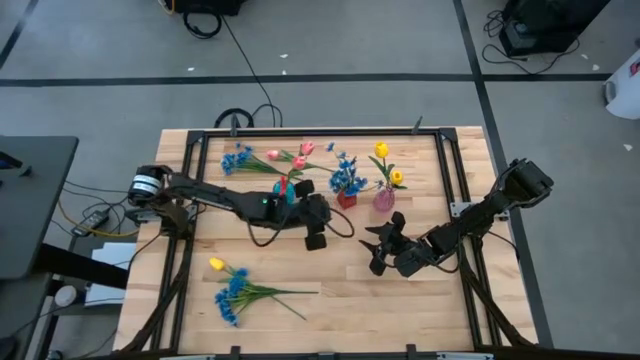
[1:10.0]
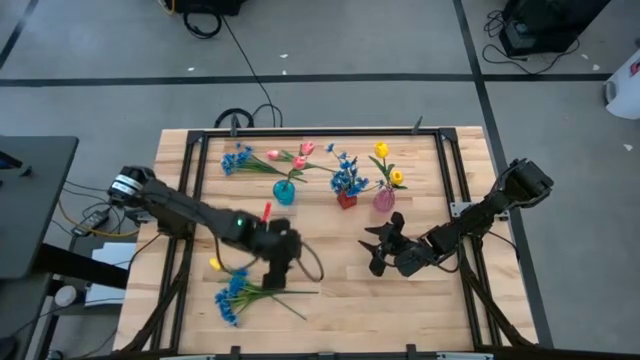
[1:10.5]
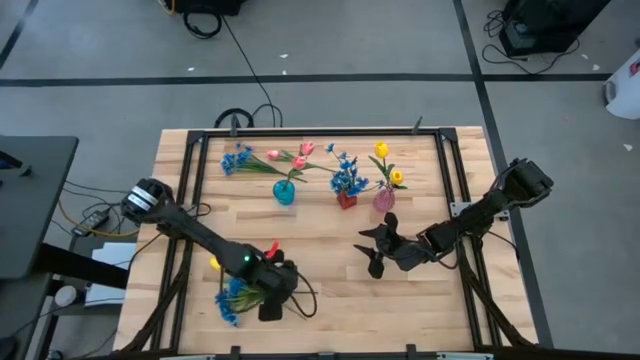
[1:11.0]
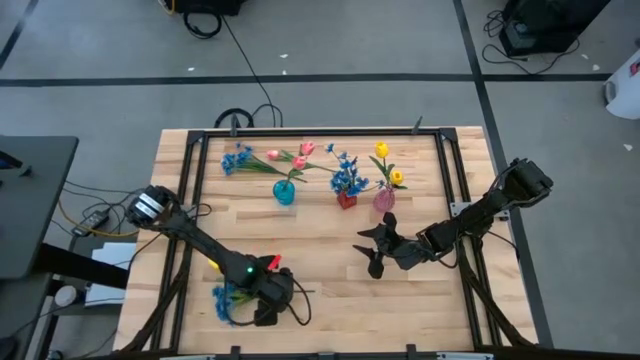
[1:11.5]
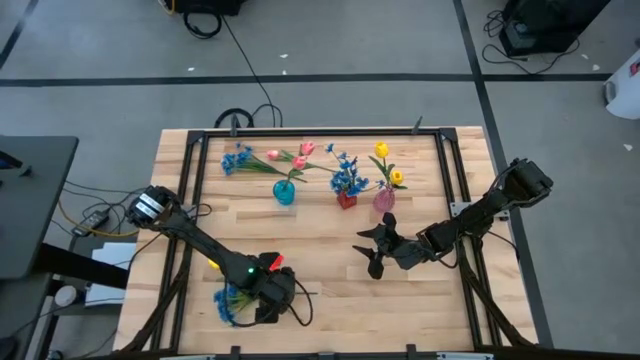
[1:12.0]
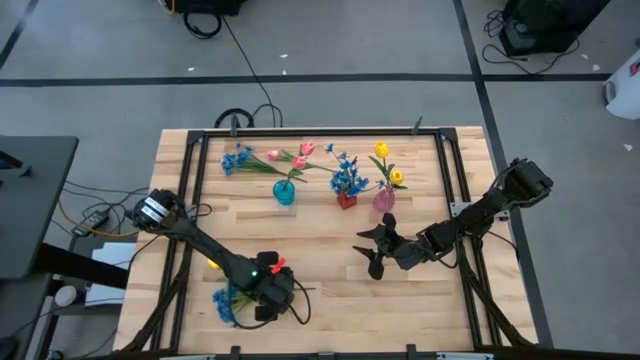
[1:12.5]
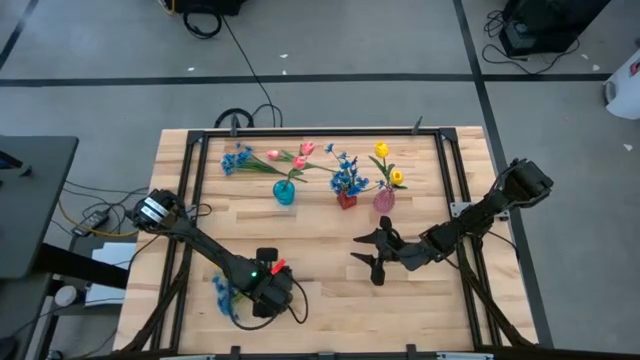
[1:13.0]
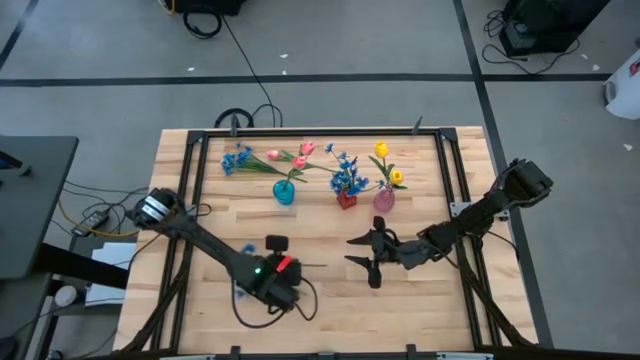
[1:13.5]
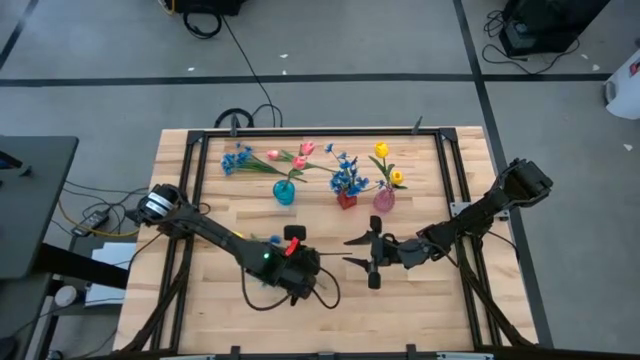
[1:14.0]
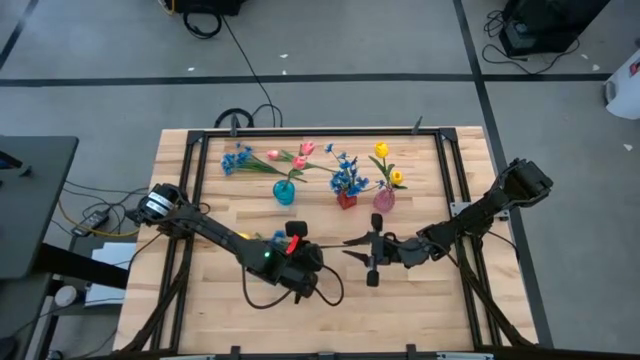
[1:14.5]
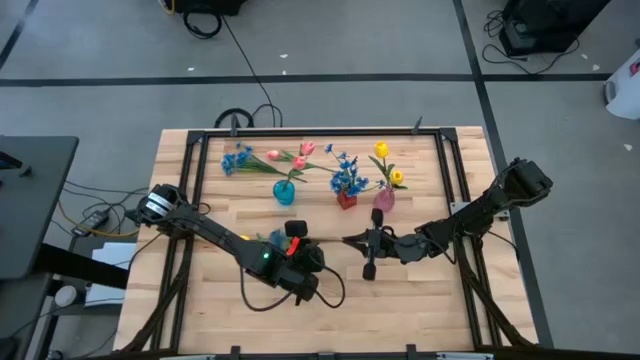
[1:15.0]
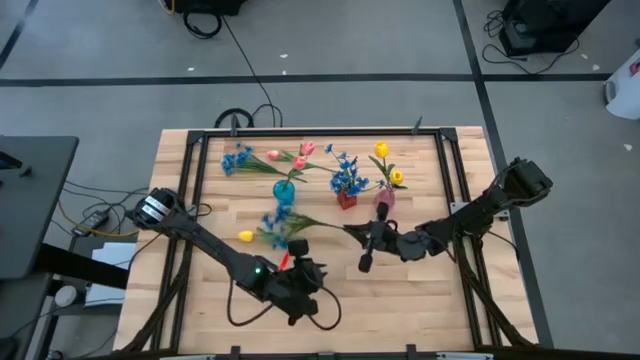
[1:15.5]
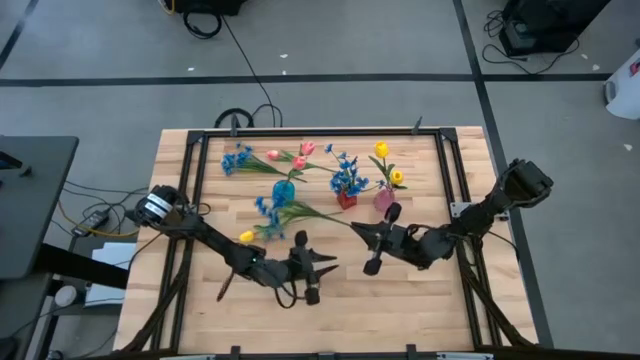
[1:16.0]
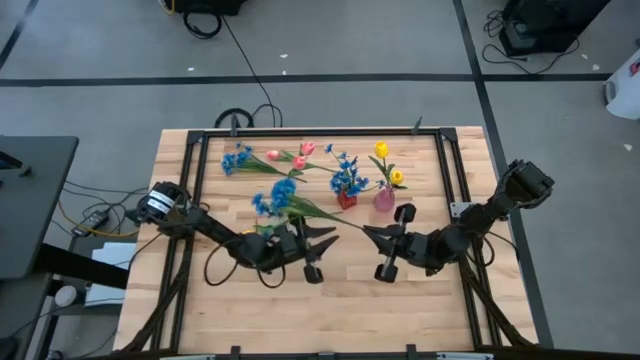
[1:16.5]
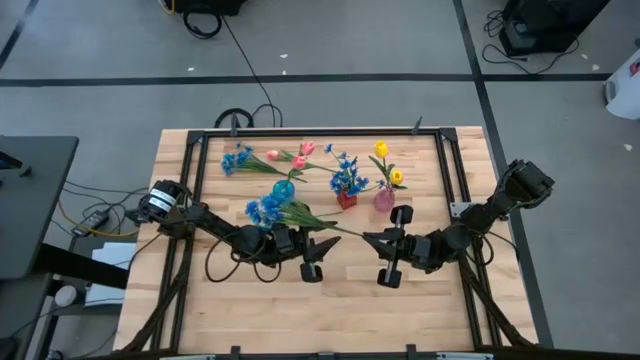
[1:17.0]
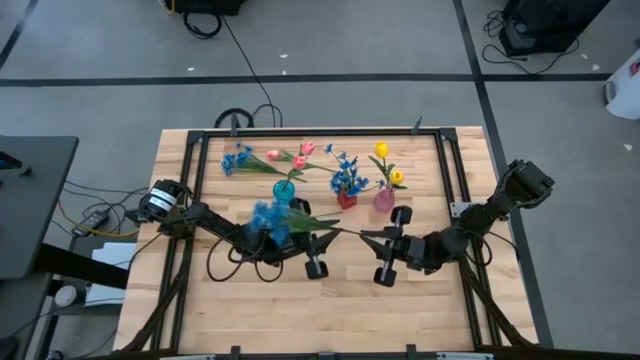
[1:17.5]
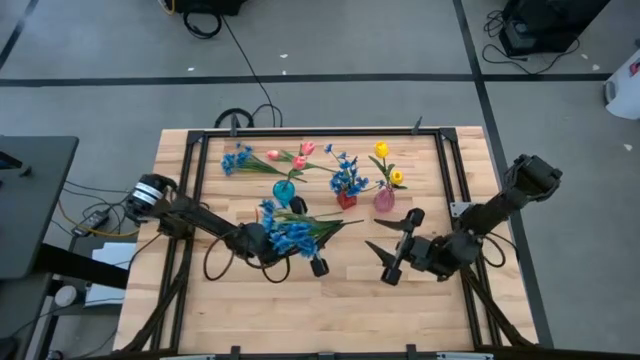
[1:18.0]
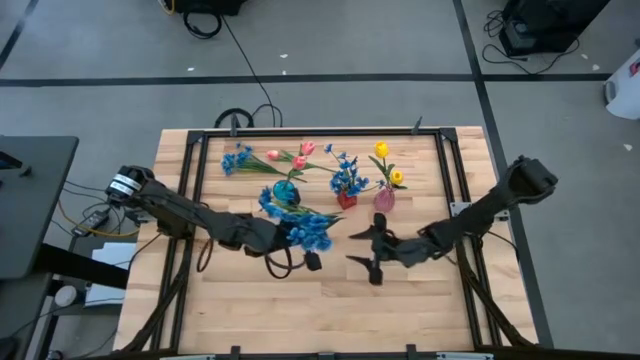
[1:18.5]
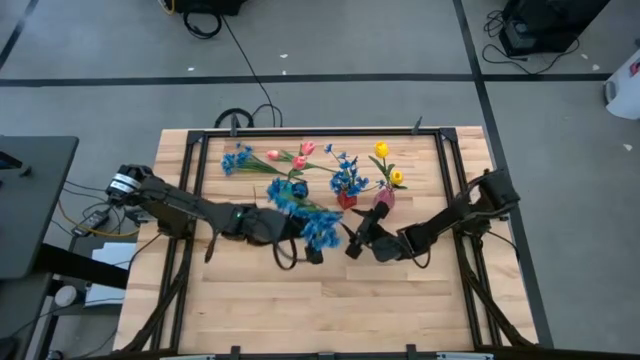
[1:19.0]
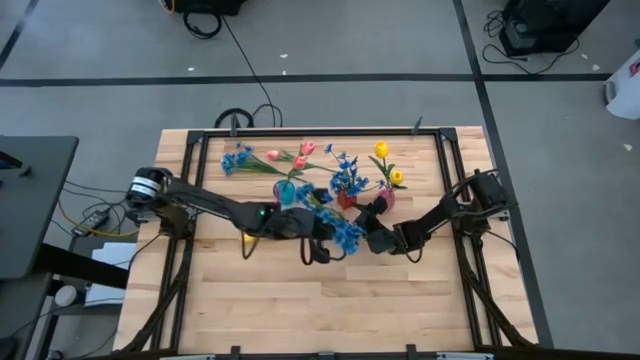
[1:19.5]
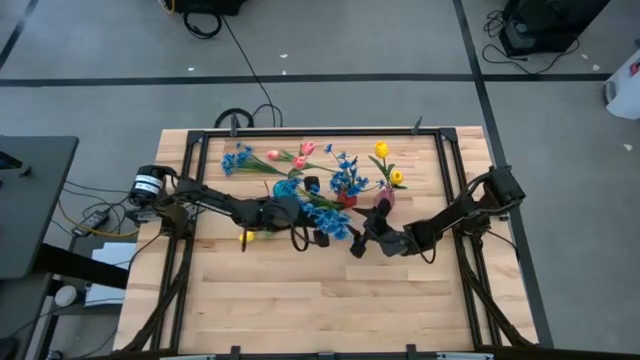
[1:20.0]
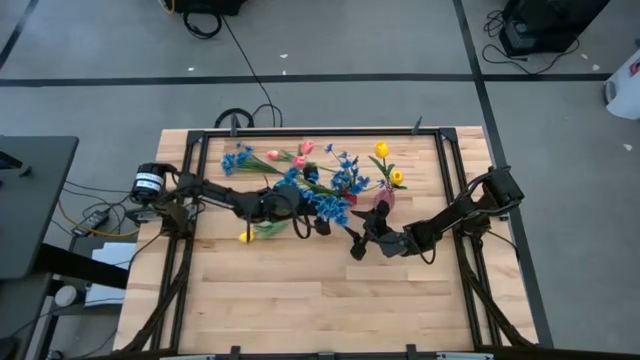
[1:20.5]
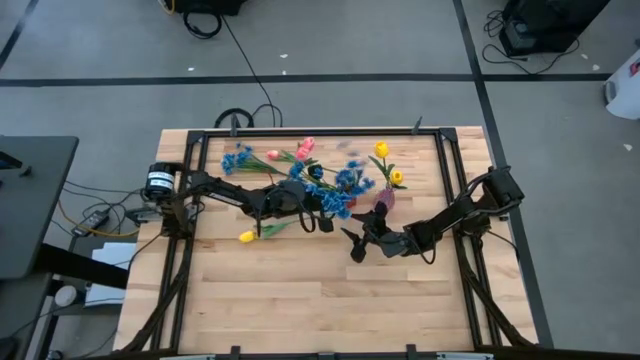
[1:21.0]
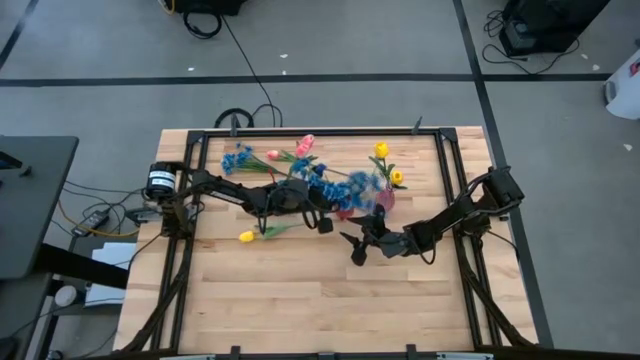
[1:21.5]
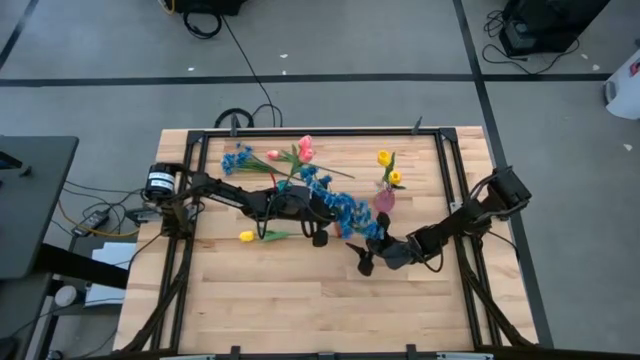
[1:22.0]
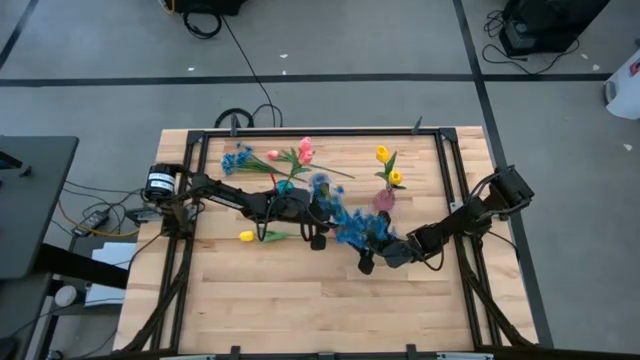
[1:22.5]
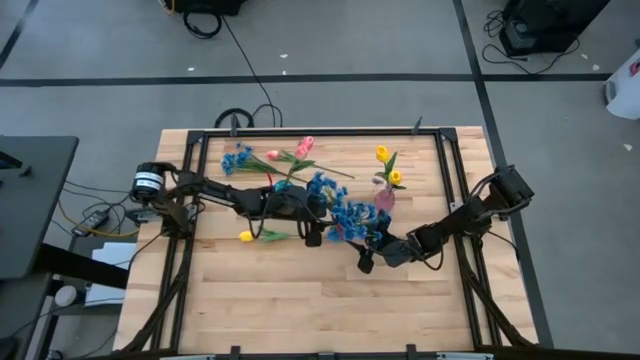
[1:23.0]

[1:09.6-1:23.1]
Task: Sort flowers into vase by color
Put the bottom blue flower into the red vase

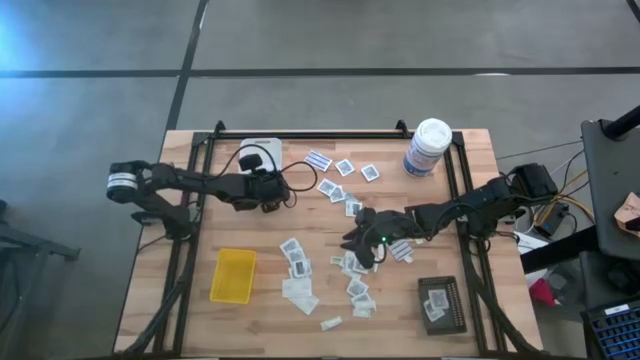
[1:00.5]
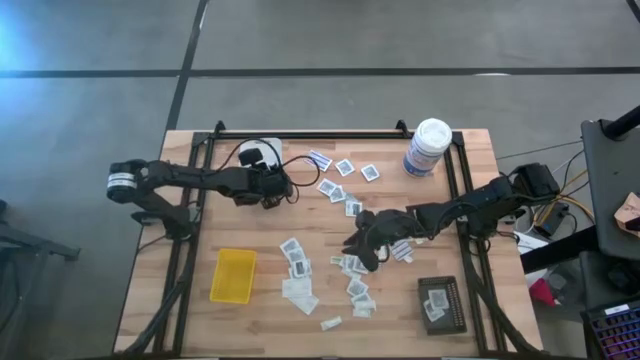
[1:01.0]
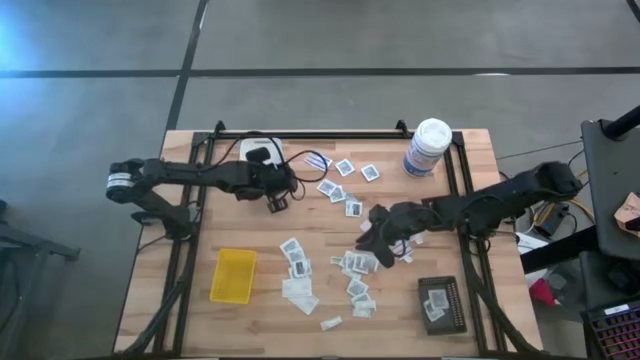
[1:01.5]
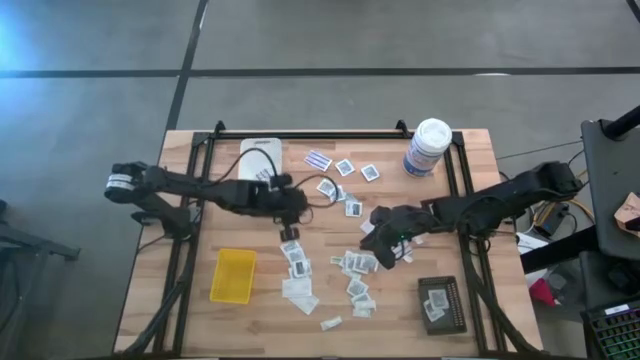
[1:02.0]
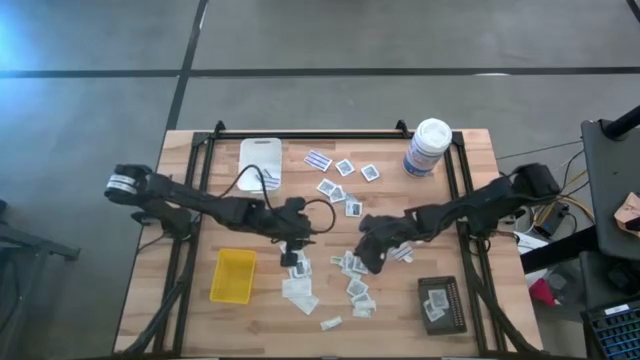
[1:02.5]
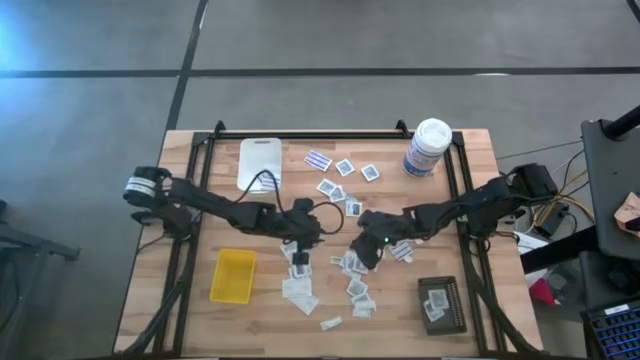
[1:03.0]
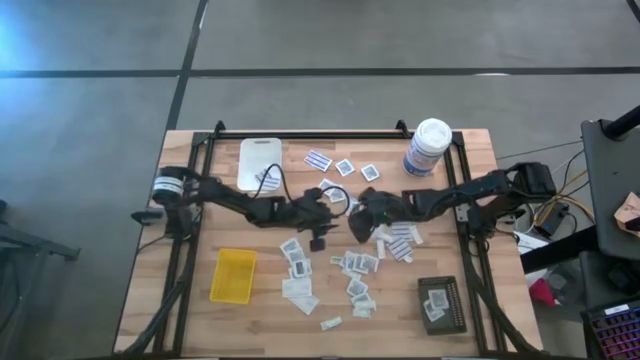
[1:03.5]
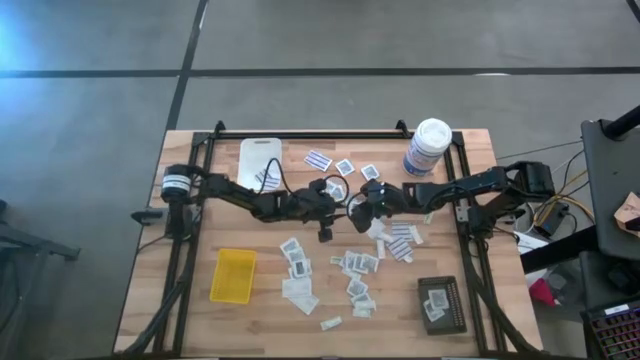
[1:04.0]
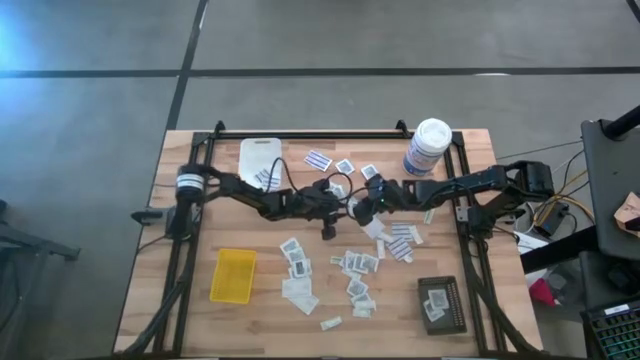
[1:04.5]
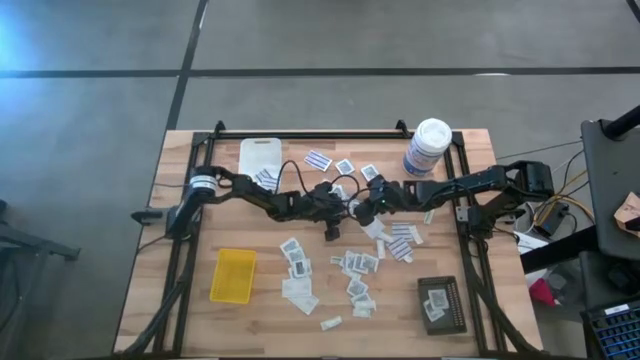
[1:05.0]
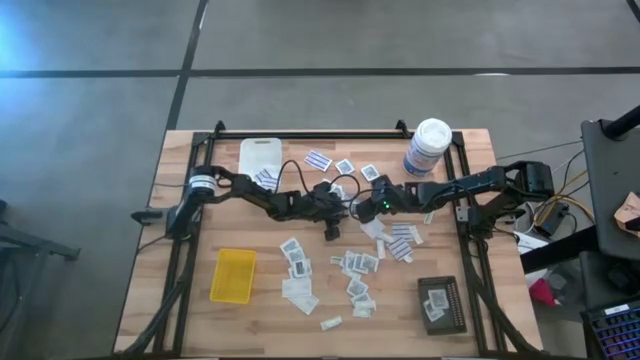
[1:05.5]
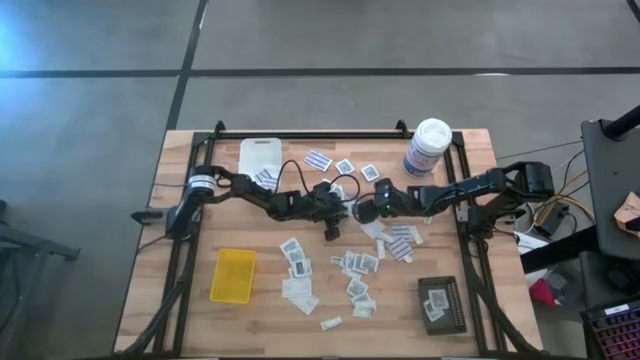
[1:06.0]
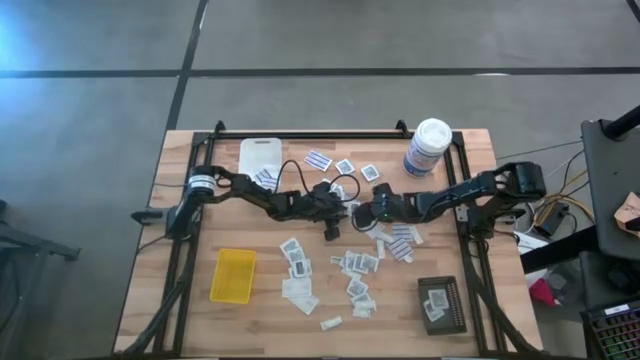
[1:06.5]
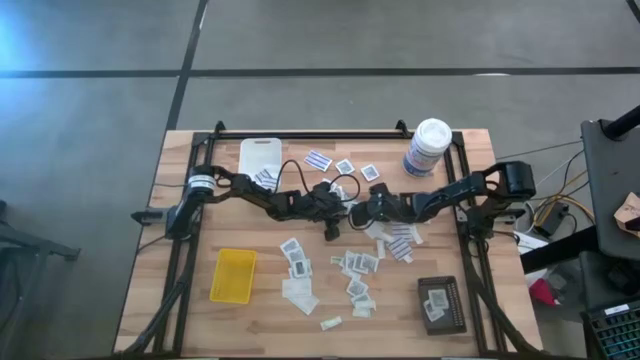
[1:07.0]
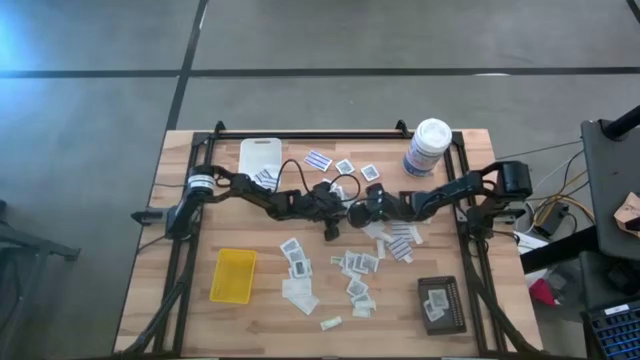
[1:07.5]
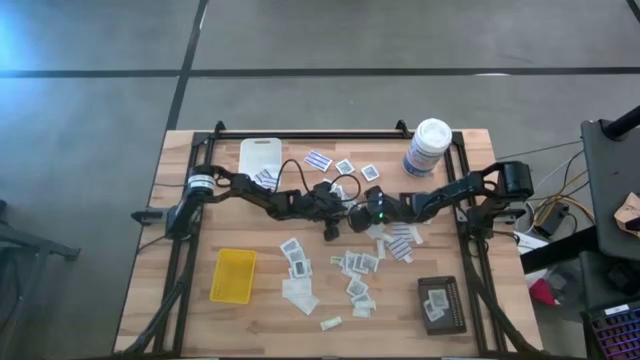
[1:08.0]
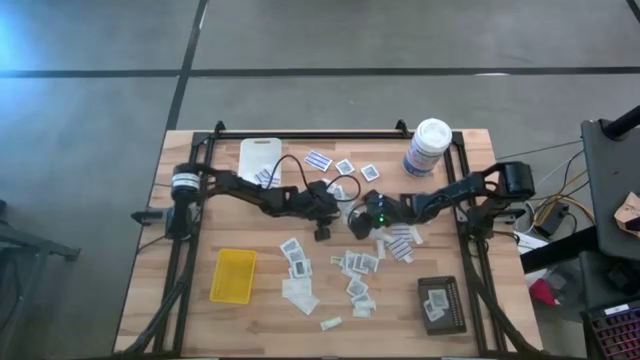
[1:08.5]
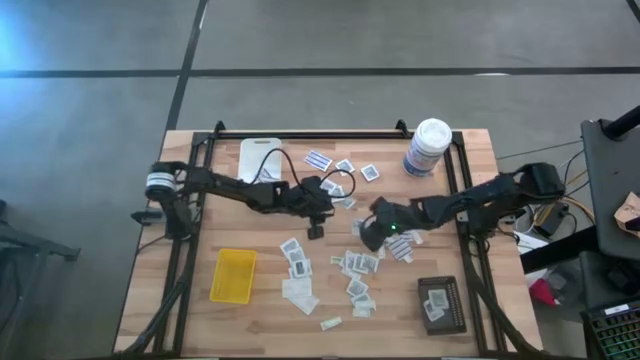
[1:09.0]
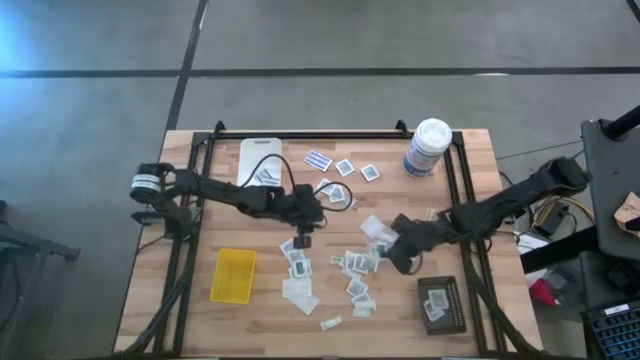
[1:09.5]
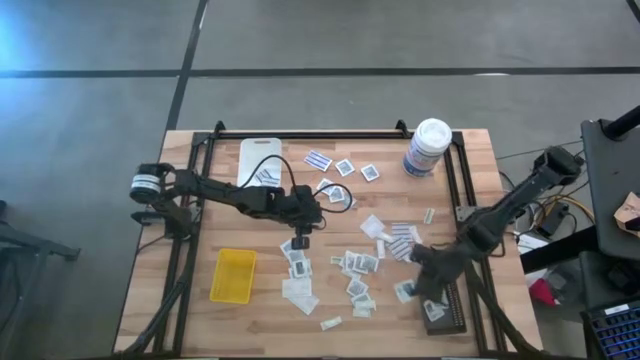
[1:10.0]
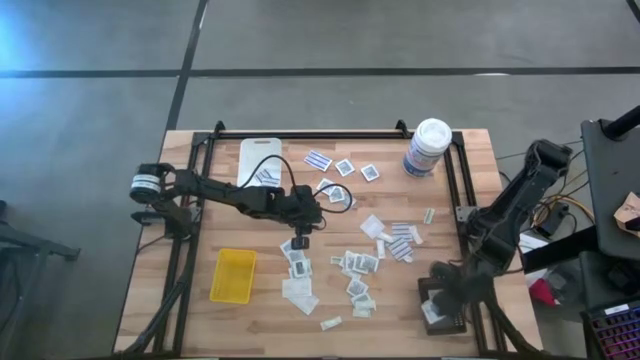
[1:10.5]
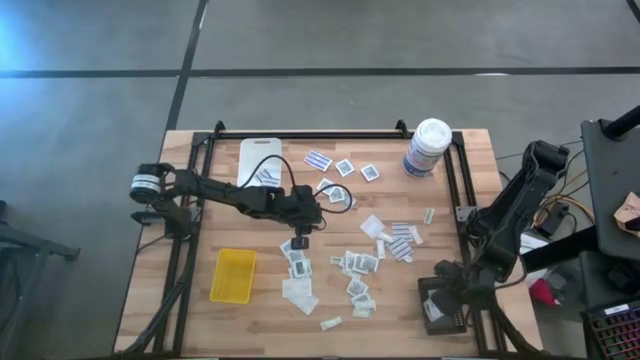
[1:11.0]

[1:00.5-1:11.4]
Task: Pick & Place First Aid Supplies
Put the towelette pack into the black bin
